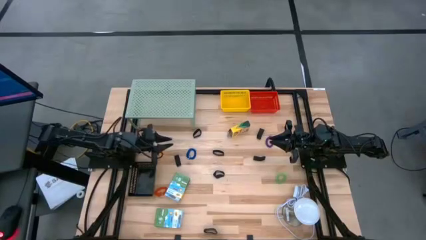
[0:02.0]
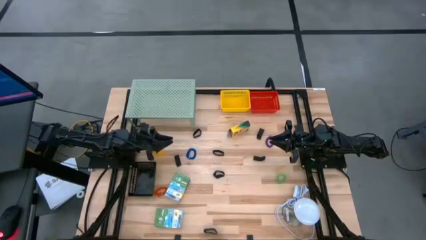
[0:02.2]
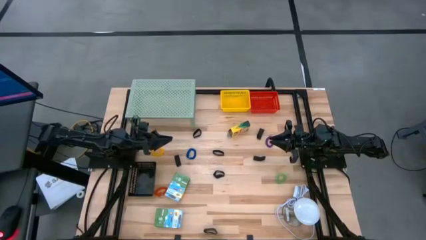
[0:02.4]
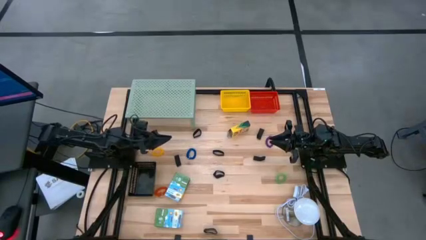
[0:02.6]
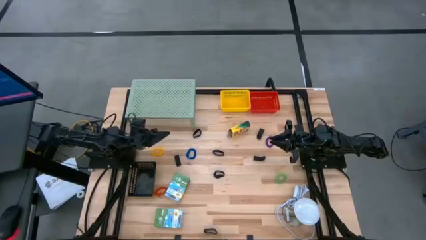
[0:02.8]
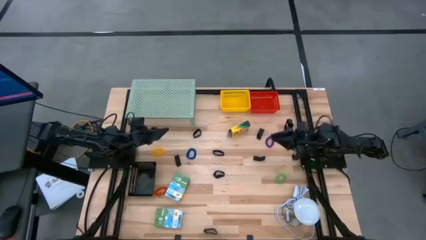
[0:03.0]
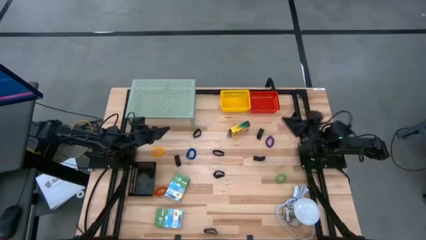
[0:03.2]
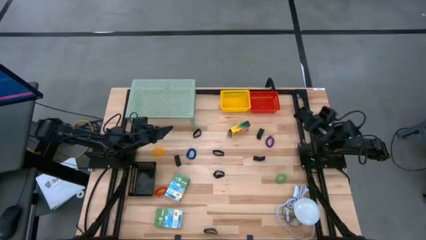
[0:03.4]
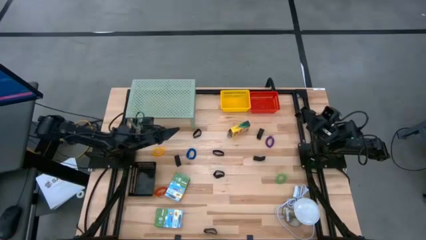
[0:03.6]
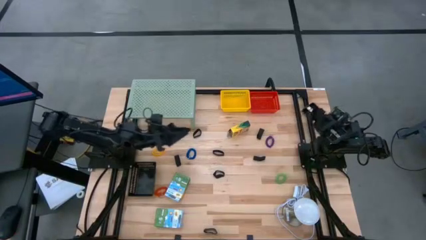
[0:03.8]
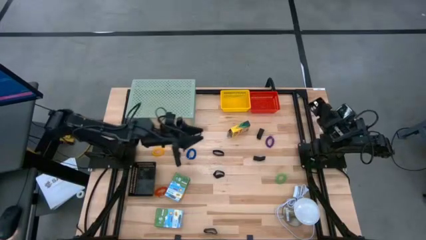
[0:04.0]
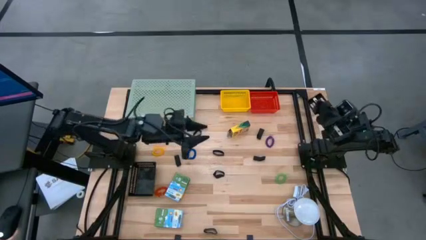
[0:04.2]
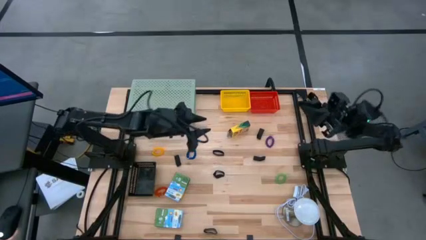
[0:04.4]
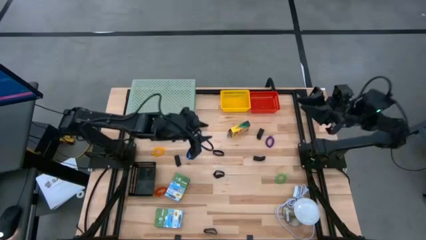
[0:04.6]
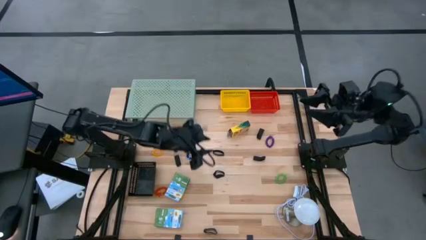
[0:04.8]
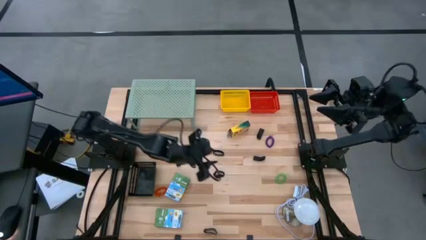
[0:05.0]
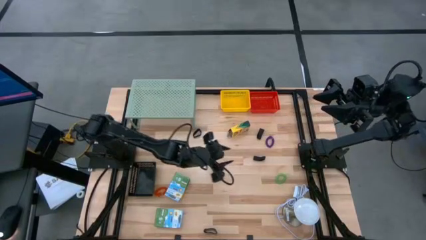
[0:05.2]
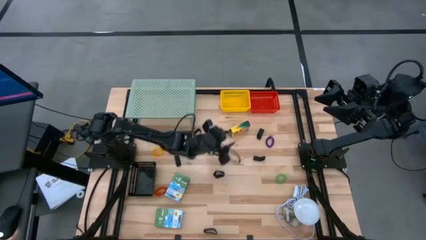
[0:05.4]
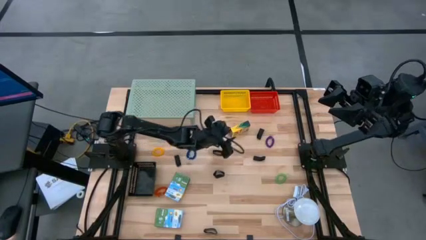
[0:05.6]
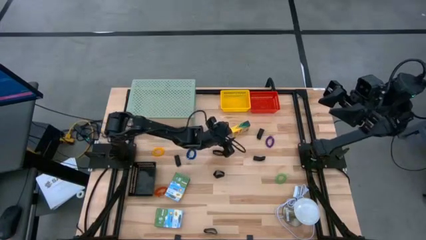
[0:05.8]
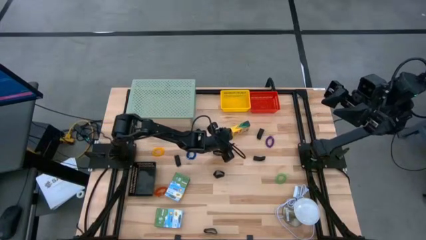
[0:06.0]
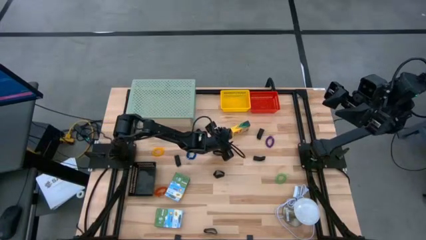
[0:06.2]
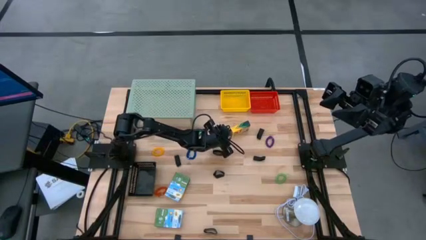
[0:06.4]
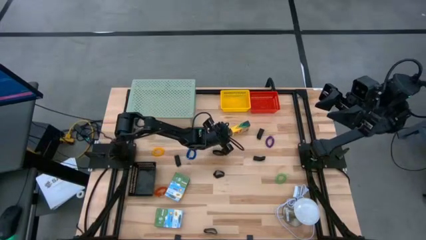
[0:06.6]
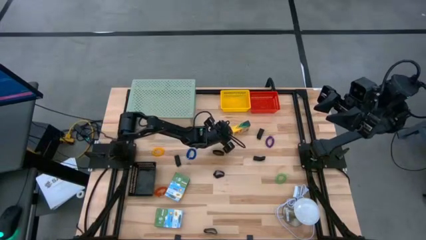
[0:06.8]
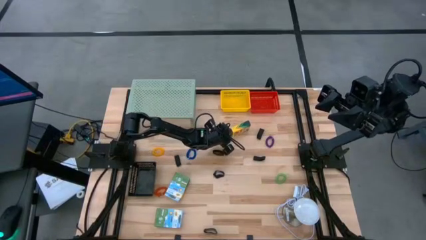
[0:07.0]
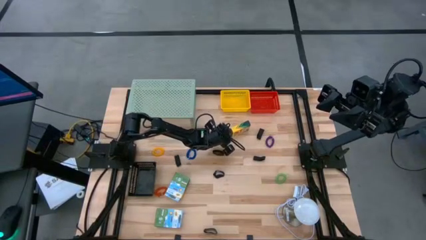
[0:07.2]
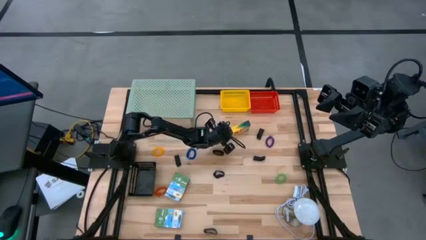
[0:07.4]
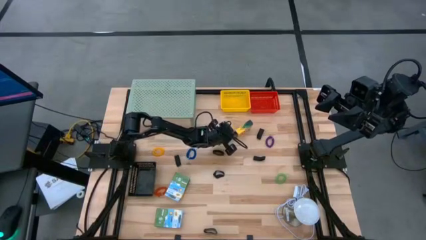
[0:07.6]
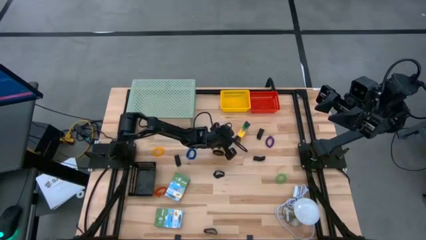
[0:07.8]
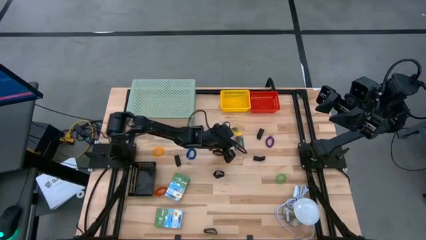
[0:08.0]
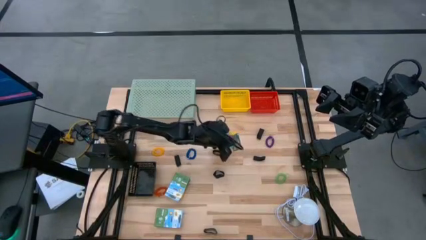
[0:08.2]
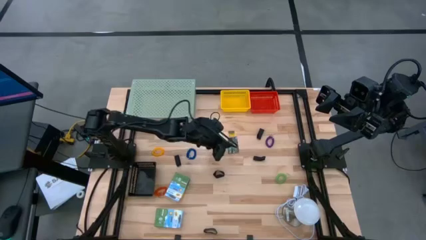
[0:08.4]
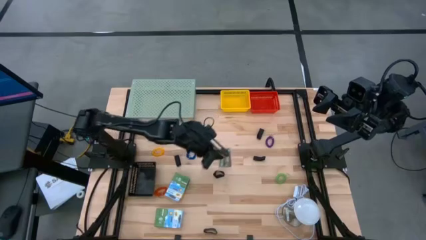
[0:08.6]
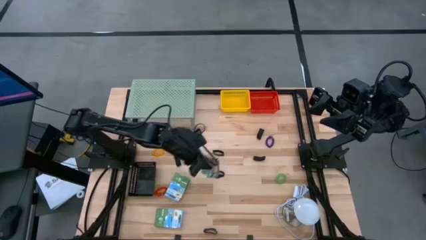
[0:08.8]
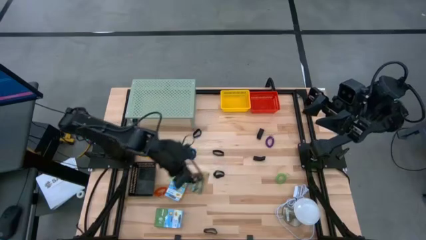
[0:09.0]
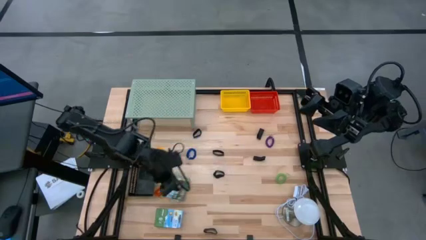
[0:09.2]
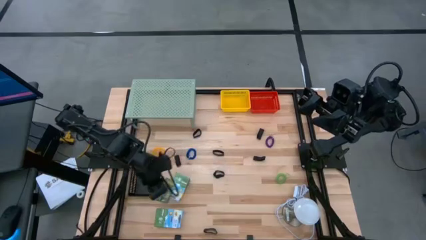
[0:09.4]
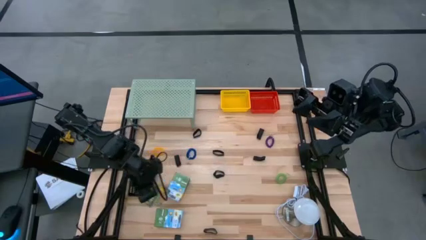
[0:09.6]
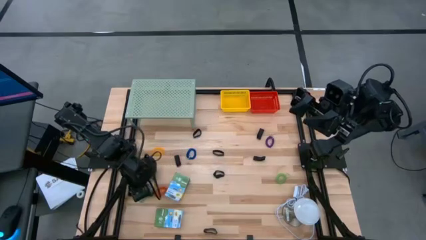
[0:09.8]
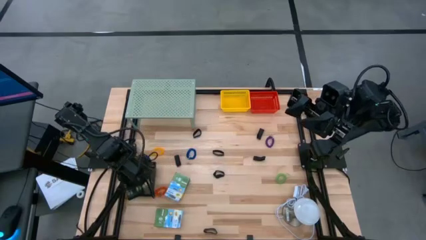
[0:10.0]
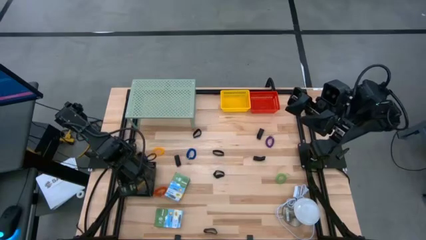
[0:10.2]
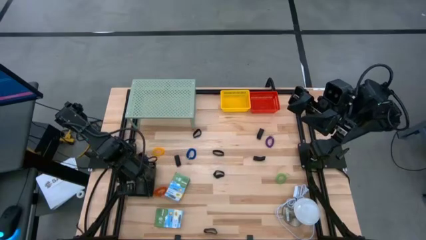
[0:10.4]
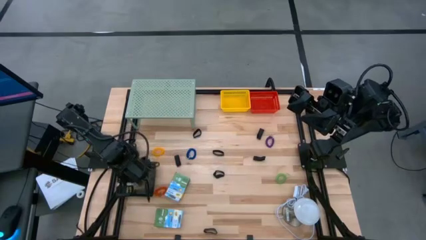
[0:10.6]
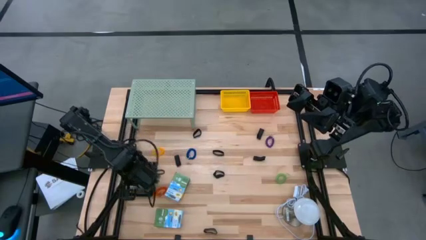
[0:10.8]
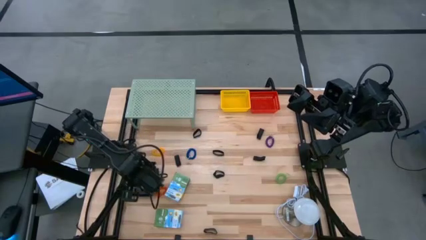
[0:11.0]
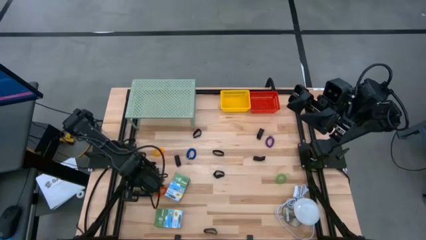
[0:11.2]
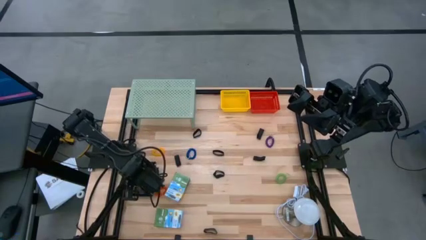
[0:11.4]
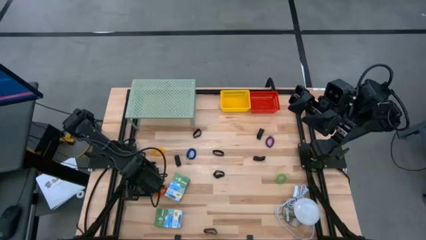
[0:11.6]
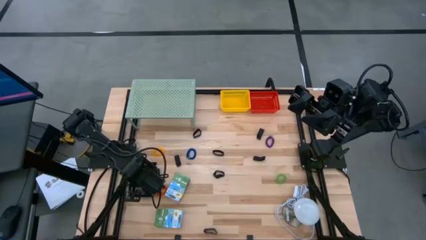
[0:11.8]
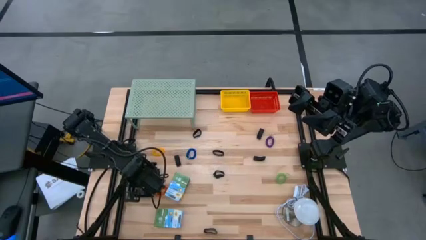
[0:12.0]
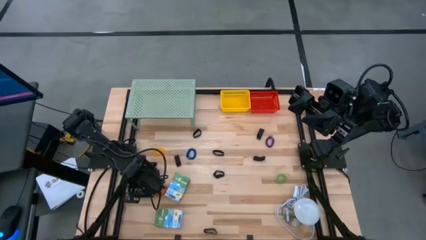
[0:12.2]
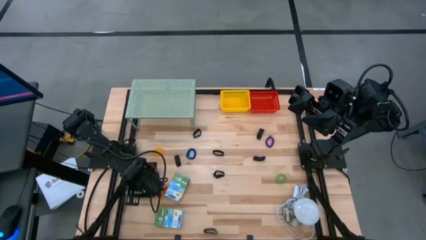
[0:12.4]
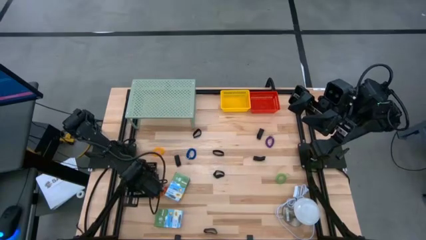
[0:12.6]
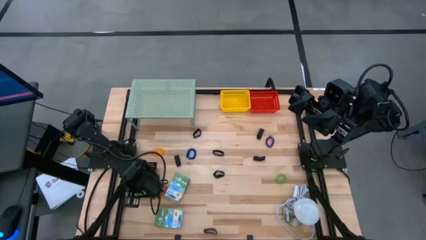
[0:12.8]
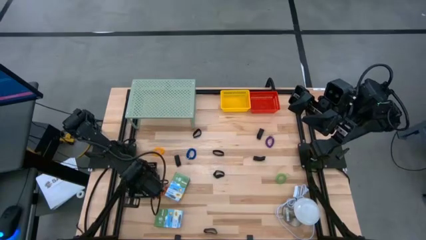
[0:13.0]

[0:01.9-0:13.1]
Task: Pick & Place Office Desk Supplies
Put the yellow crayon box into the black basket

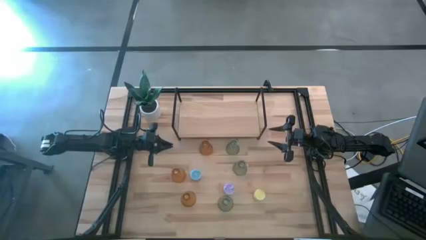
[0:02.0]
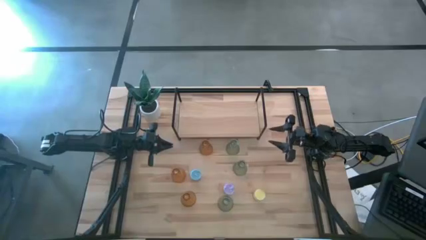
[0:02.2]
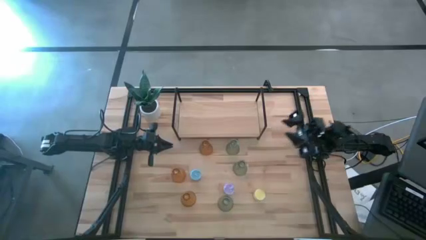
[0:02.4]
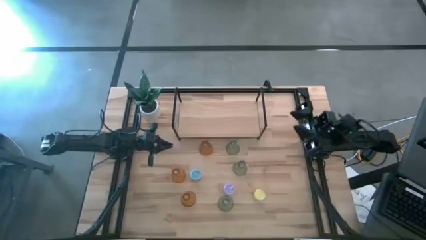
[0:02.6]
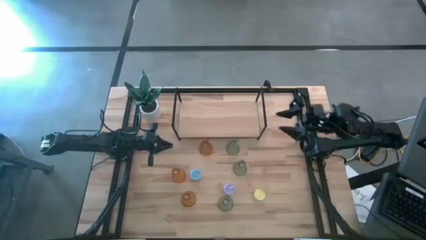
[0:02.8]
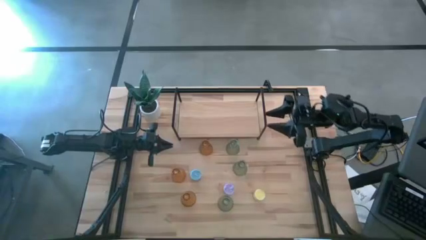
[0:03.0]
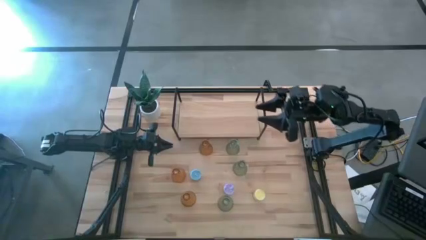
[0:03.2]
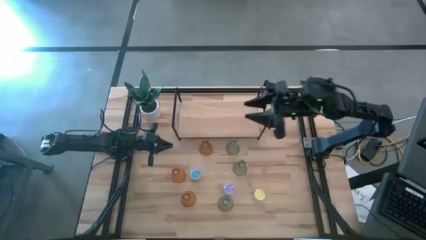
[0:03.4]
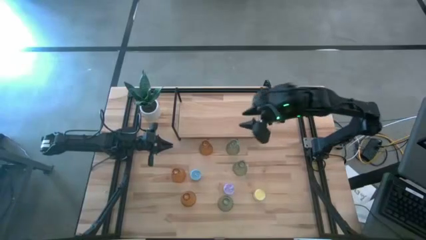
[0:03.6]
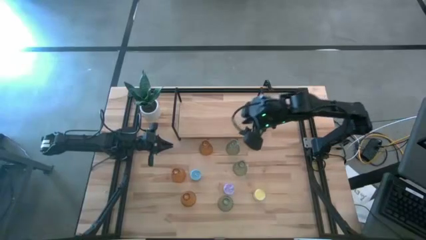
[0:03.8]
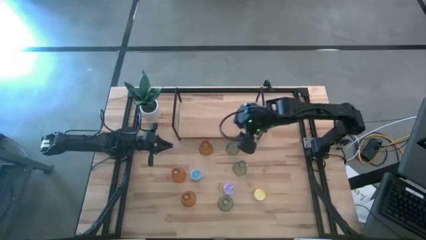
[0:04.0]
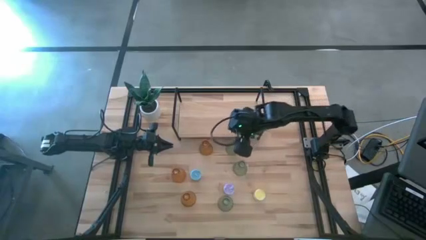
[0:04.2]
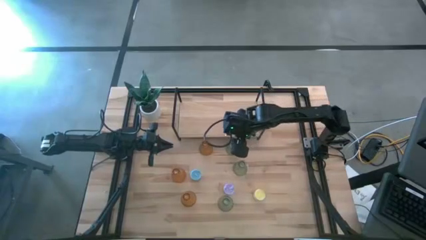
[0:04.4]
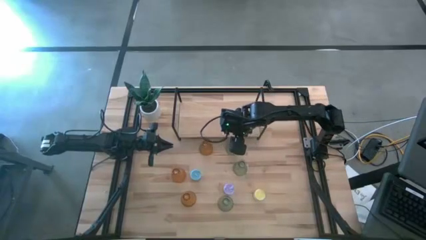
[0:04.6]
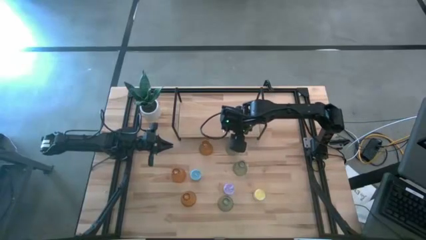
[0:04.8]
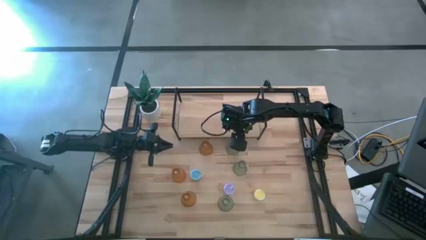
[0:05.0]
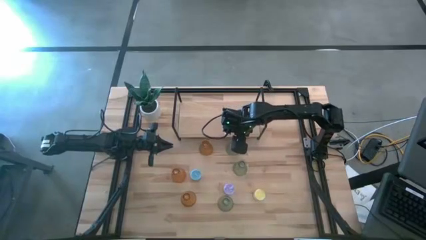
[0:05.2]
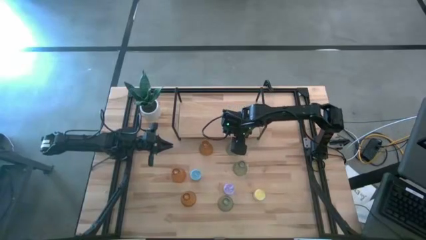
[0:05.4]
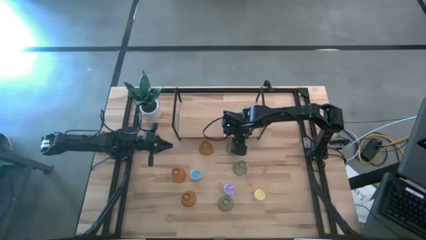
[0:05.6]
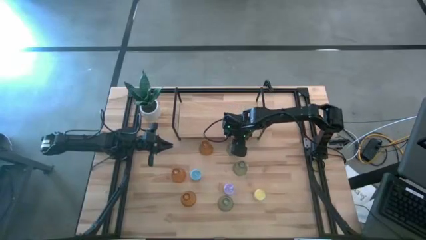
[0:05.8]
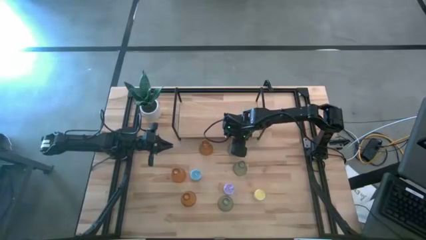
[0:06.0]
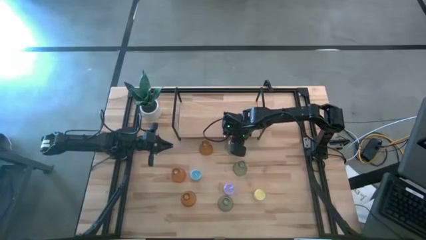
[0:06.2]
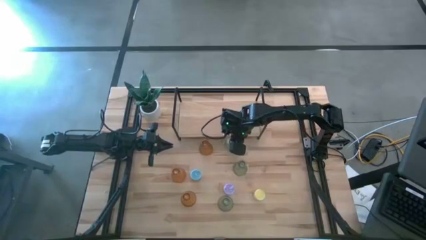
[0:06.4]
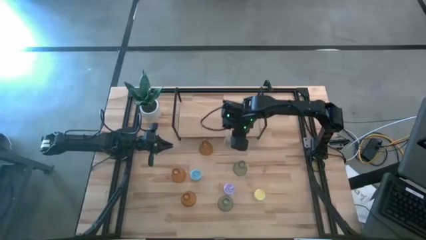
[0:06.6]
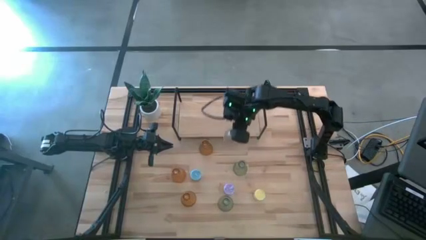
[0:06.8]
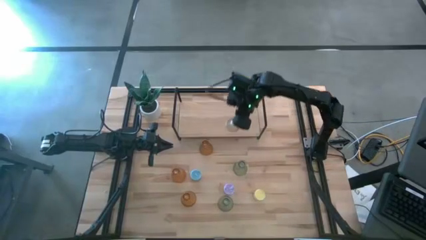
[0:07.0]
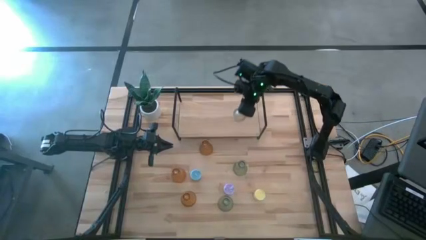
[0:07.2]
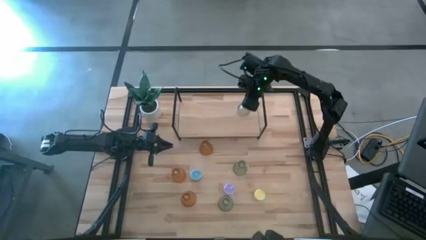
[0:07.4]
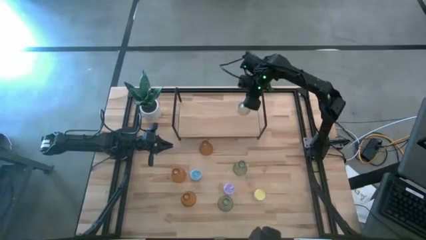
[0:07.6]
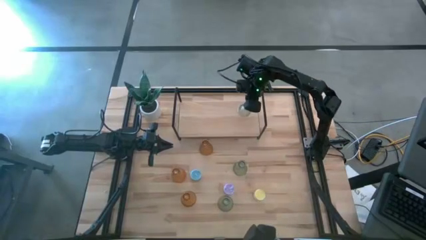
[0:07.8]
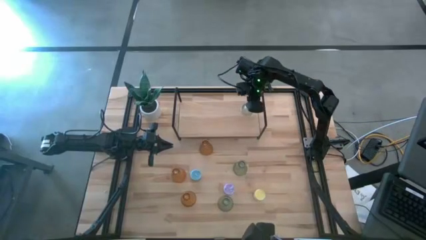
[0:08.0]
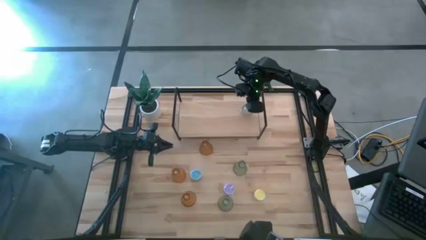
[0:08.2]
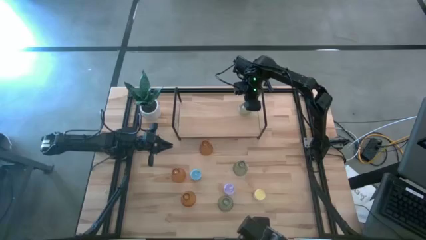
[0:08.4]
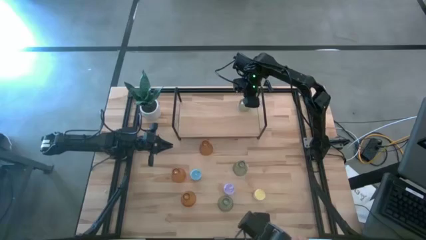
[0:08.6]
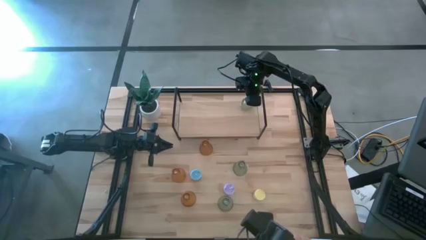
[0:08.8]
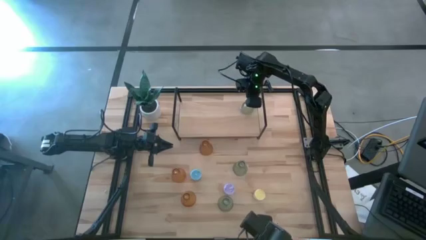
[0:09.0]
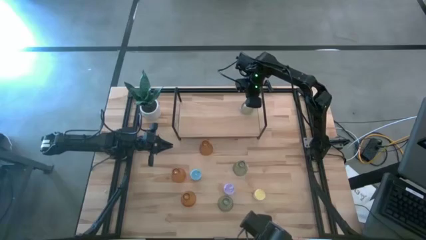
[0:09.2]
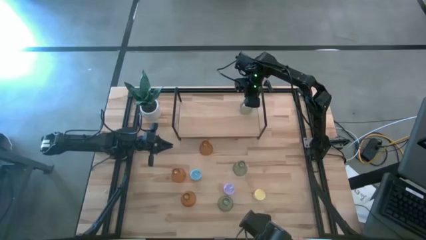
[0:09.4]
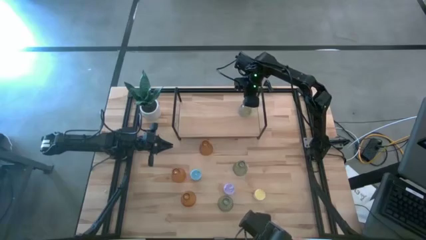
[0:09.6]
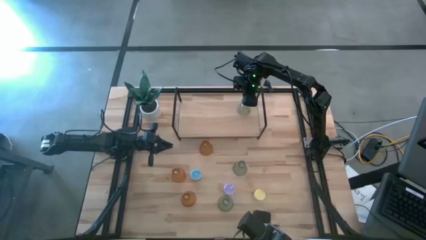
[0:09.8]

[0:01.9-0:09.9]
Task: Pick & Place candle stick holders
Put the top green glass candlestick on the shelf
